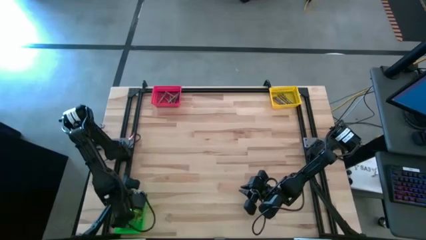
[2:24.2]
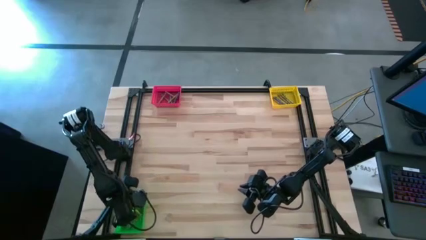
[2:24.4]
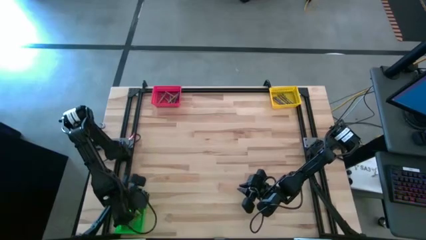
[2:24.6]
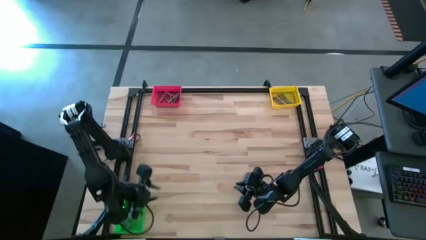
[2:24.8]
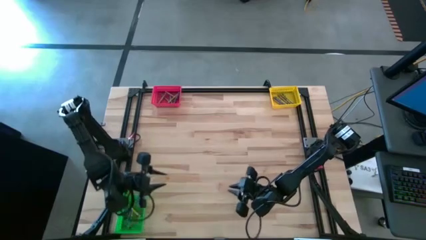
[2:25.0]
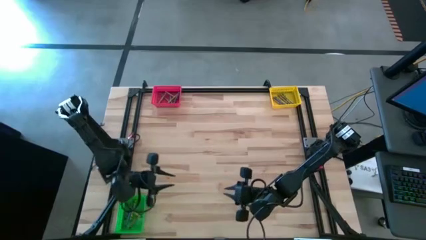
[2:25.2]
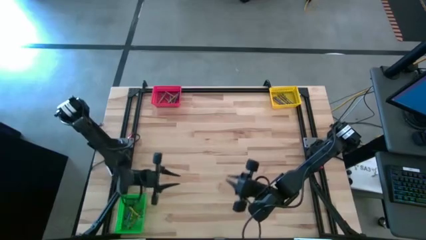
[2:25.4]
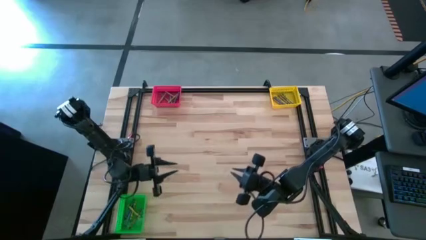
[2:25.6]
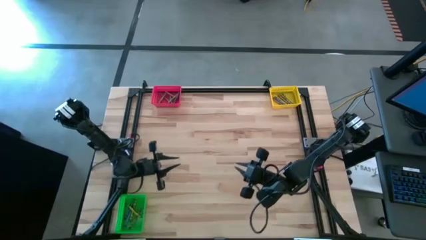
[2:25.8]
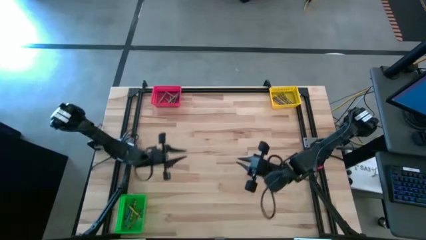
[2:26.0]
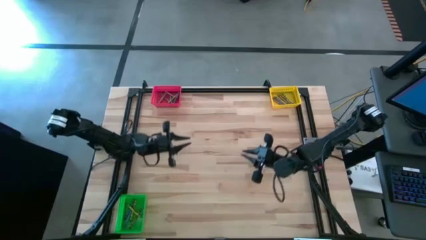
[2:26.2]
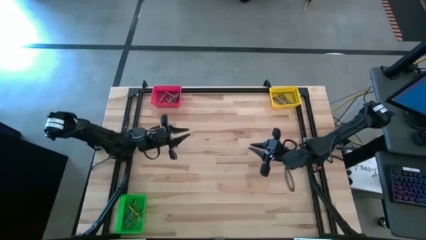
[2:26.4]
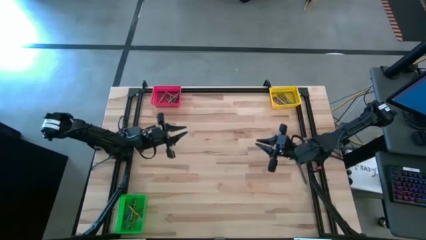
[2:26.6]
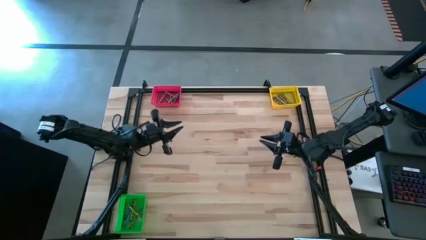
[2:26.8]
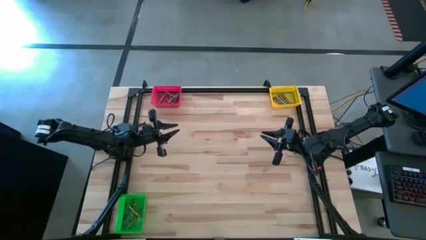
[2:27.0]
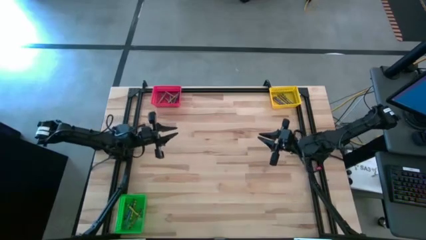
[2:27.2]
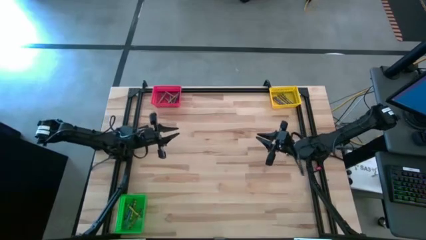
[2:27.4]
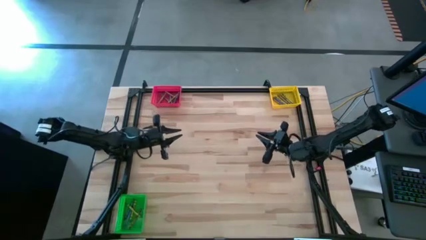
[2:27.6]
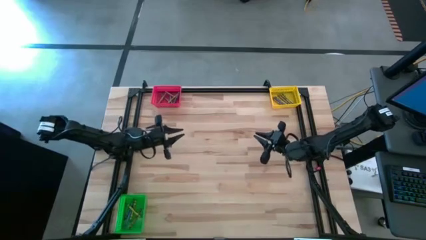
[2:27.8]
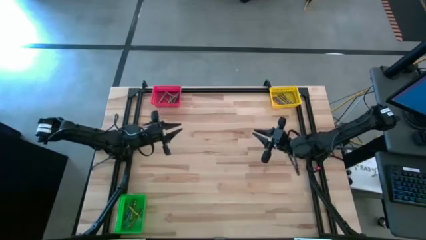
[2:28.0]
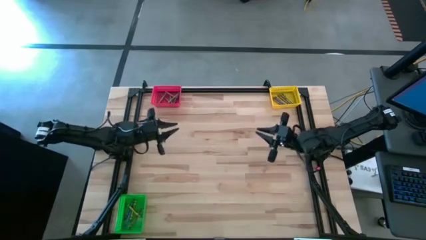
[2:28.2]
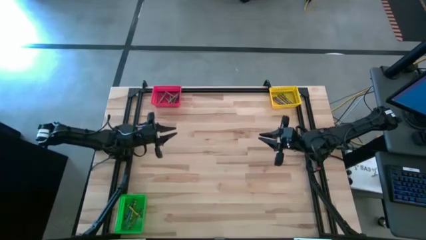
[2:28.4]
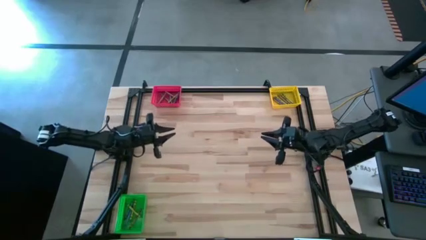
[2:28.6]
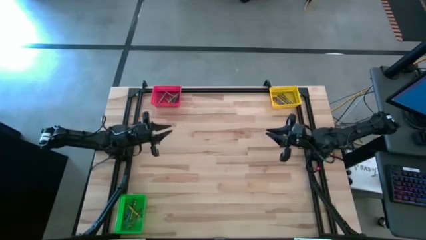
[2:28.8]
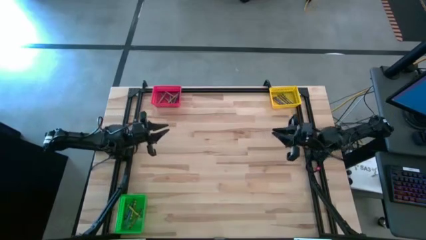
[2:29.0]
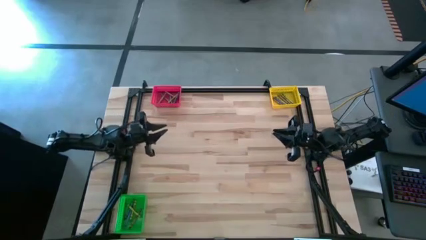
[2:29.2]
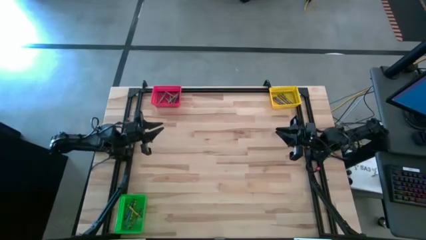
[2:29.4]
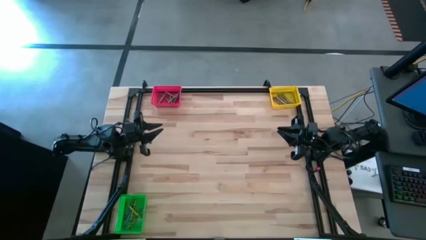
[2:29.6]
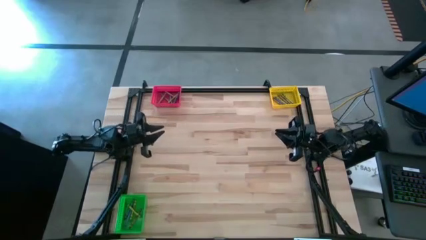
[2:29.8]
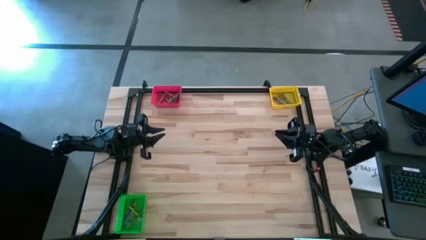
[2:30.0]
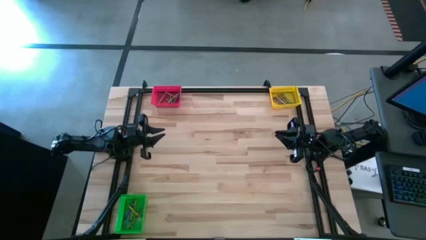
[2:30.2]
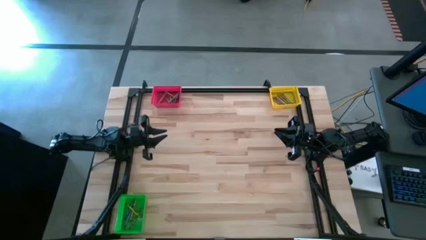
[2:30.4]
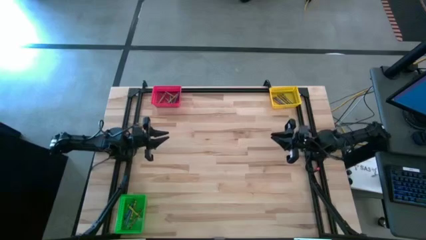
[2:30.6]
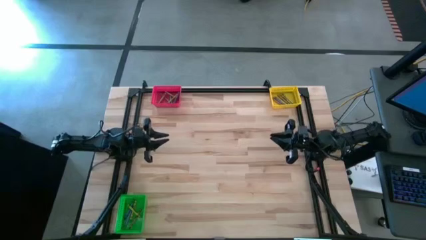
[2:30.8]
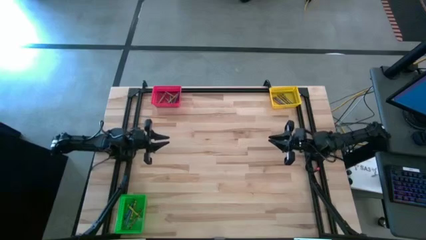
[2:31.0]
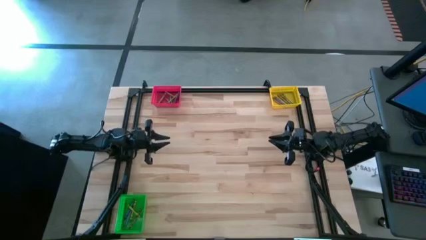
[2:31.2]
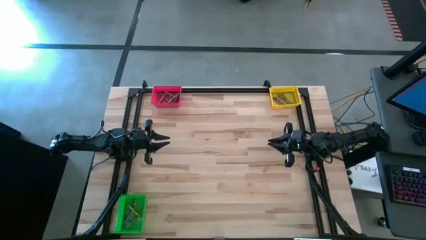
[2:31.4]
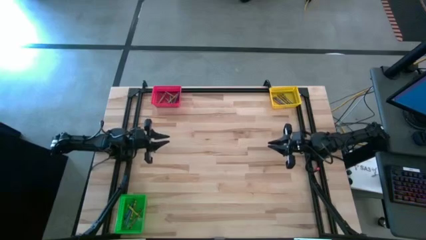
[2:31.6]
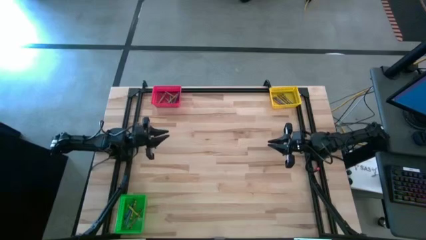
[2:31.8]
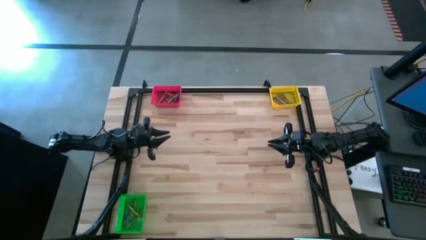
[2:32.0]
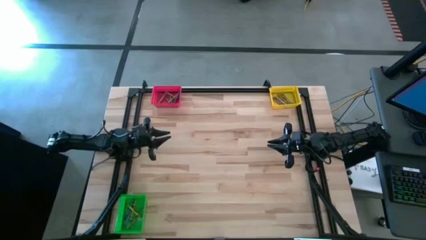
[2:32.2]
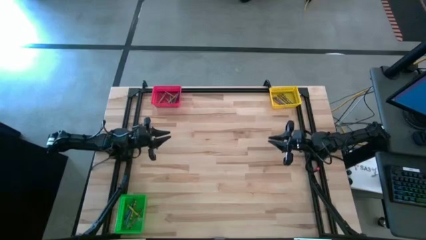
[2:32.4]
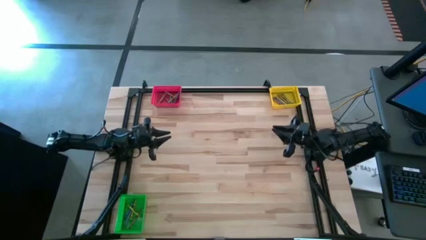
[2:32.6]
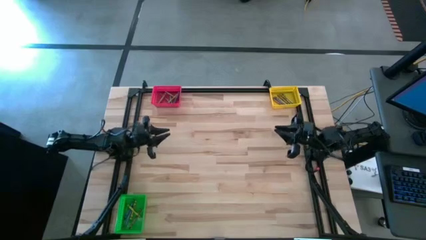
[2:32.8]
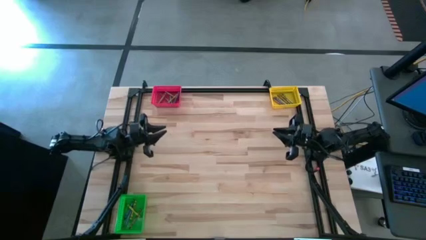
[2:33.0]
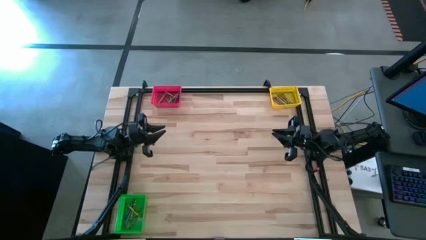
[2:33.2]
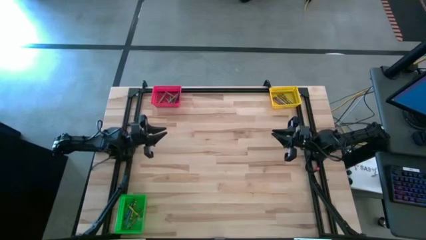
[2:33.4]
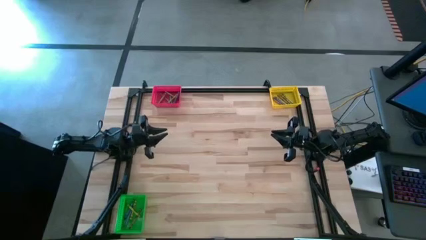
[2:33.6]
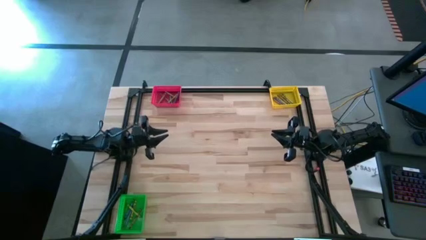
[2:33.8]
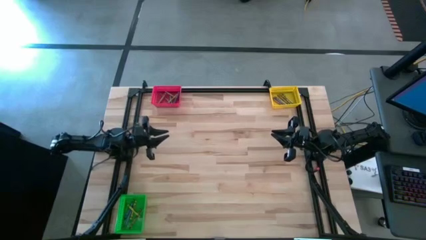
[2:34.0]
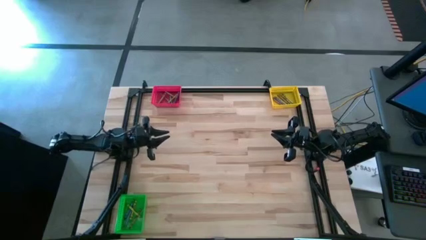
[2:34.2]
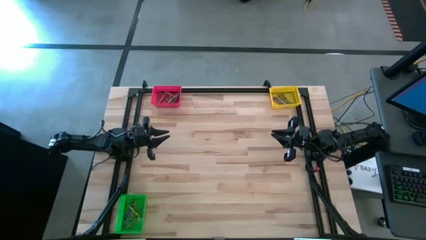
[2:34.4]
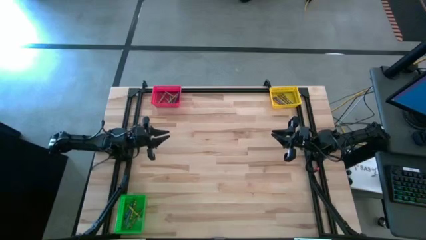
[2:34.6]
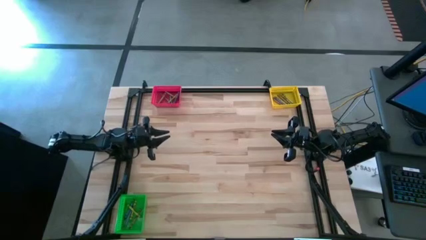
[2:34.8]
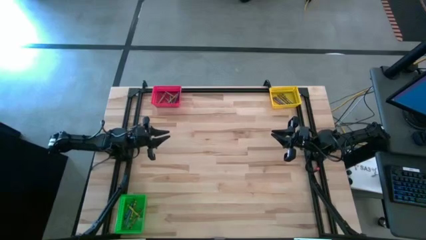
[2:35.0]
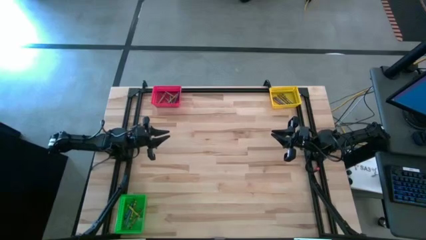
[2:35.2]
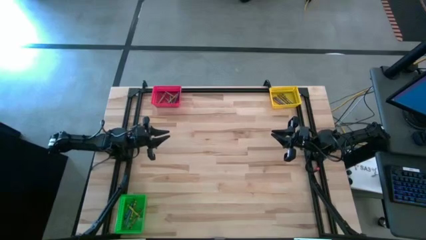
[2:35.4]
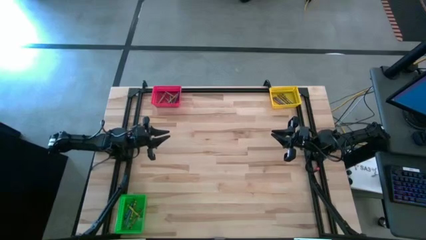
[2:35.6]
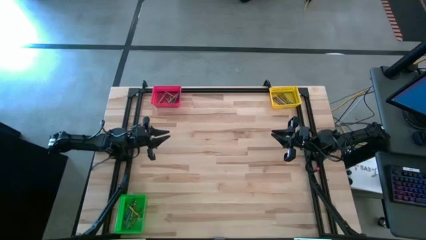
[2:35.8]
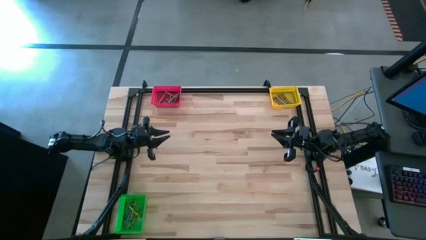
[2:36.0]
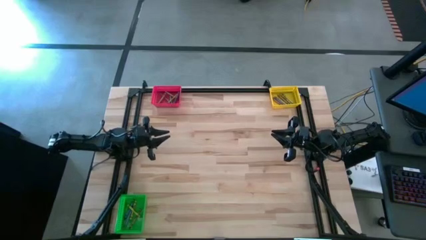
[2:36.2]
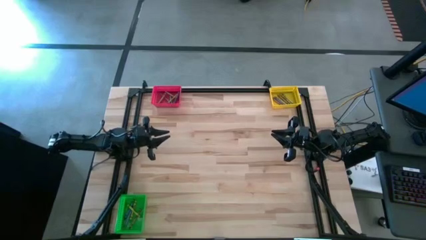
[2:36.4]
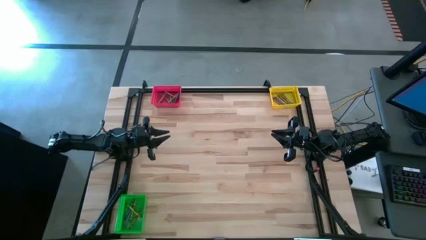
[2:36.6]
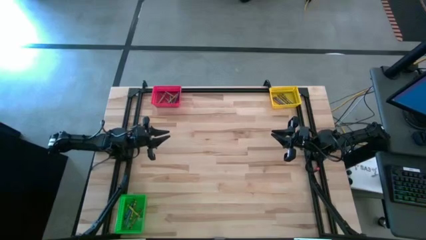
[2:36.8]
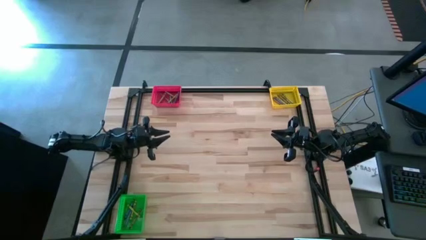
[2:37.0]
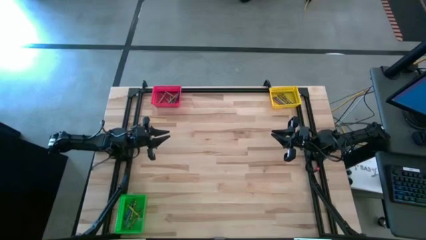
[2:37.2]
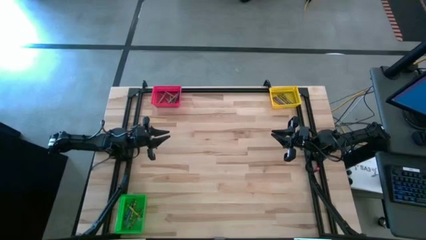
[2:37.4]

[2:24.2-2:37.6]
Task: Sort crayons
Return to Home Position

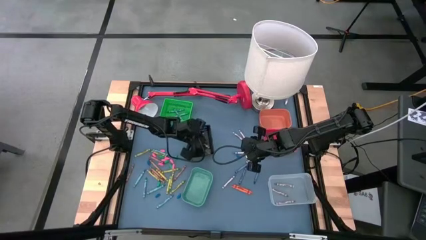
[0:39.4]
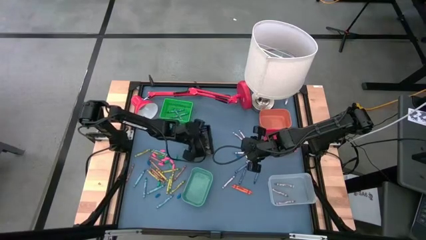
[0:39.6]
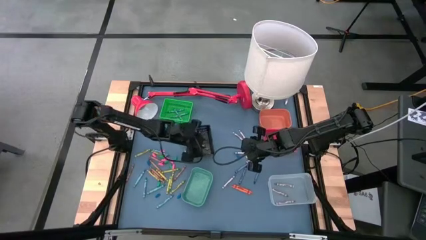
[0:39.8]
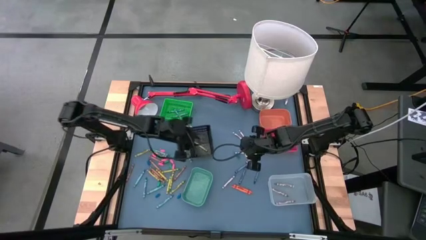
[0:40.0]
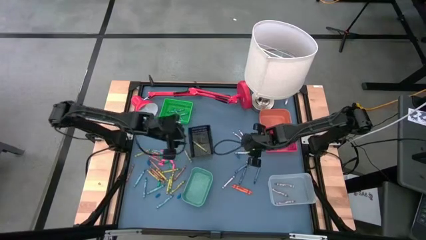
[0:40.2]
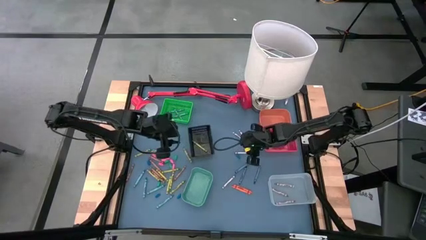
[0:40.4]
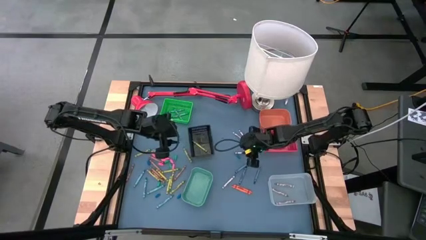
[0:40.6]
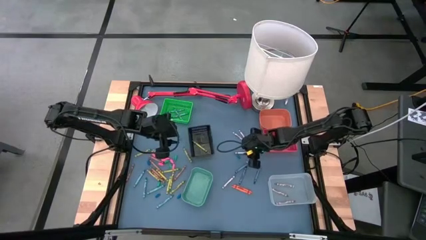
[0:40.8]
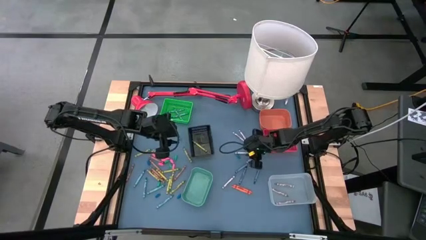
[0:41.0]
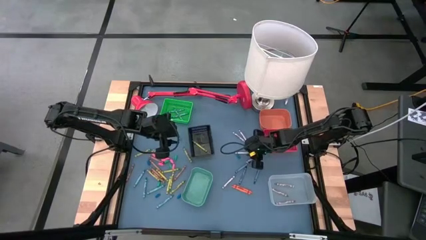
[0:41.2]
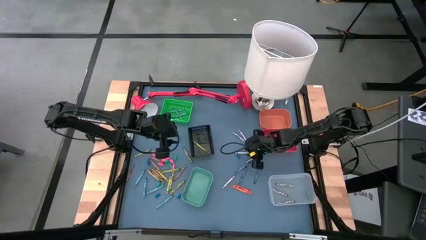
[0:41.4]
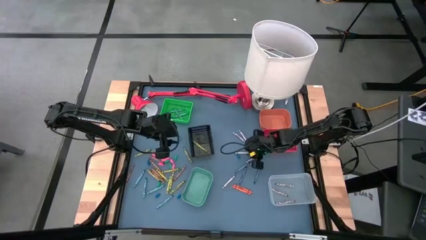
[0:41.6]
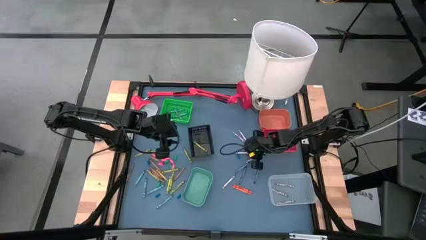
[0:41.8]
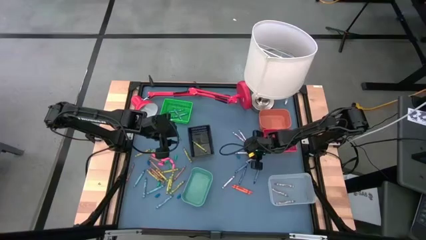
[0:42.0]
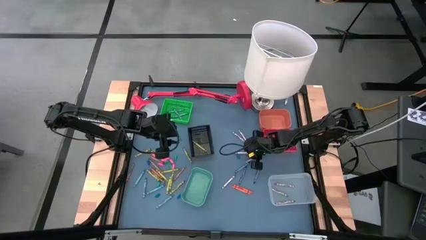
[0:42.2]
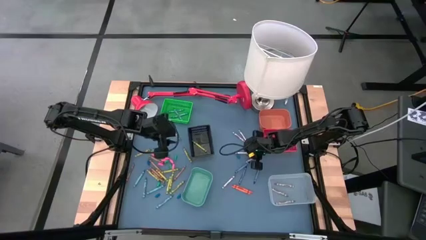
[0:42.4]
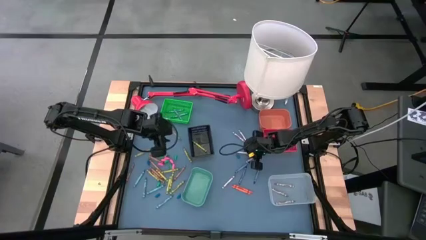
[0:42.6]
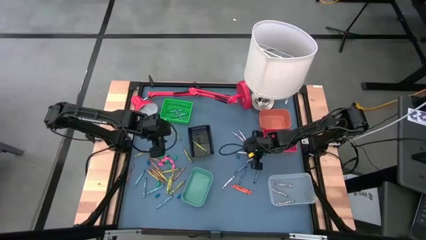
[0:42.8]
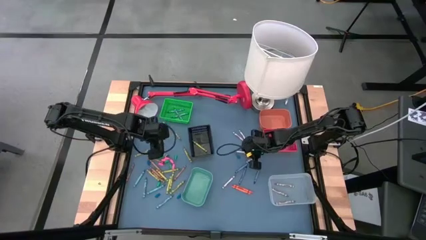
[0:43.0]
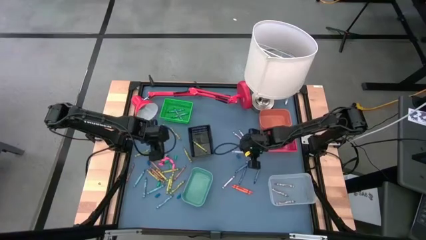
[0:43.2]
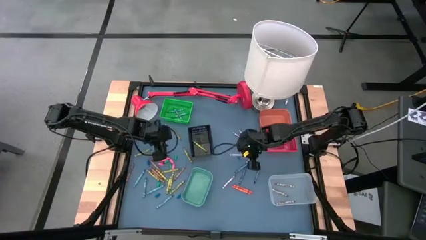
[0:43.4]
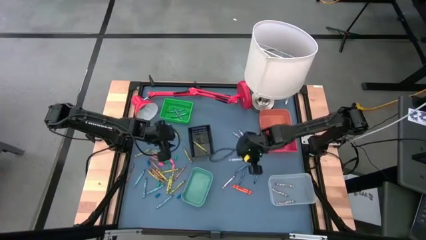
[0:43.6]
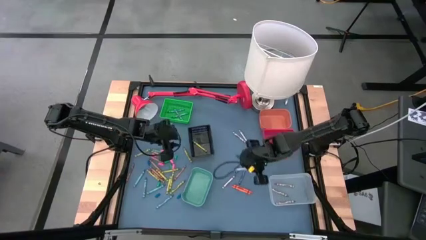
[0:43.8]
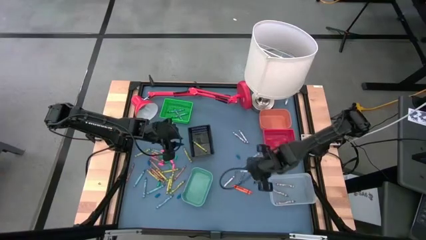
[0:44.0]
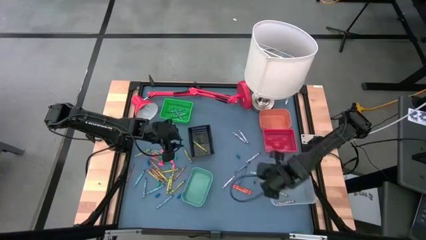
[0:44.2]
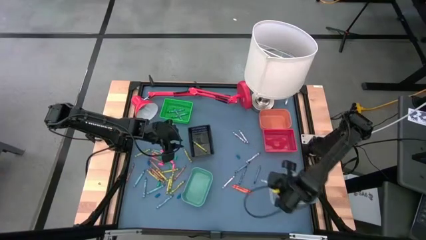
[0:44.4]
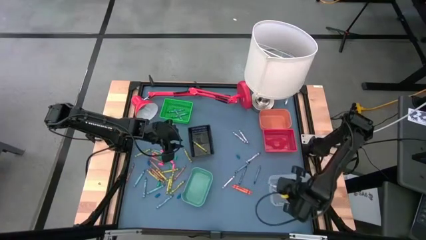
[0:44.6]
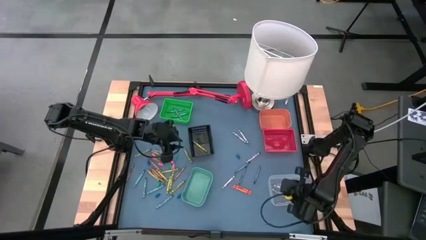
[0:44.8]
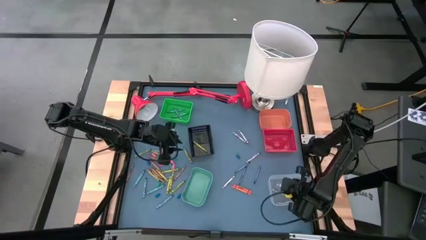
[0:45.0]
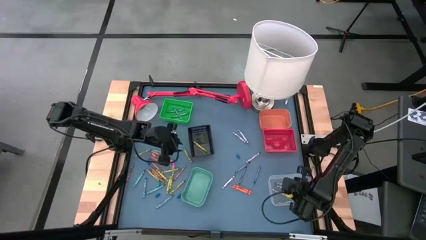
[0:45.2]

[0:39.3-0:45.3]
Task: Sort crayons
Put the gray crayon into the white bin
